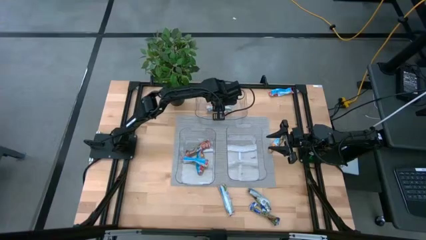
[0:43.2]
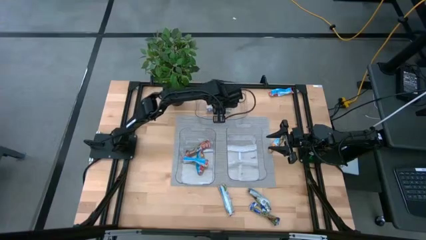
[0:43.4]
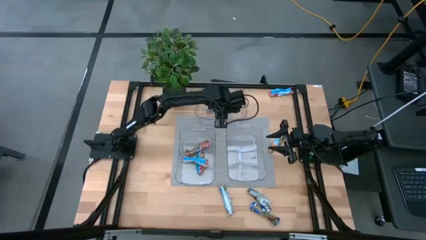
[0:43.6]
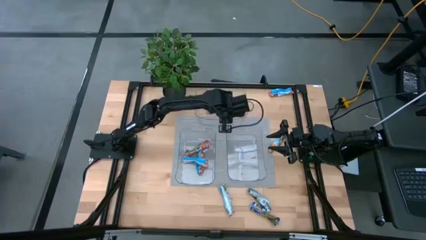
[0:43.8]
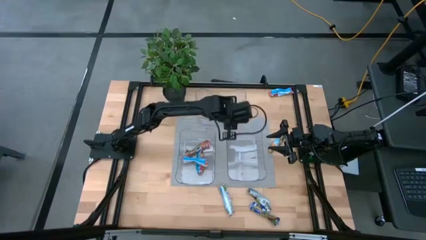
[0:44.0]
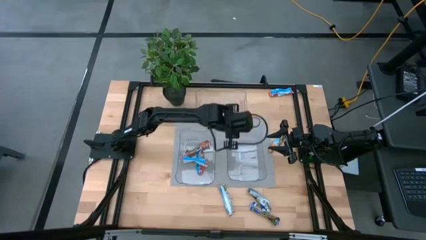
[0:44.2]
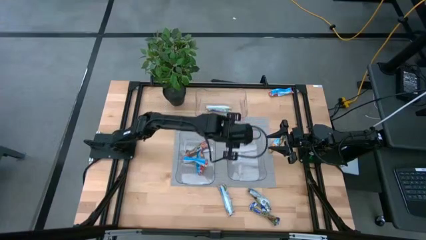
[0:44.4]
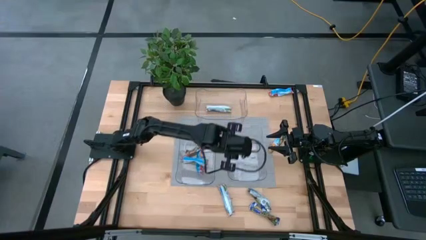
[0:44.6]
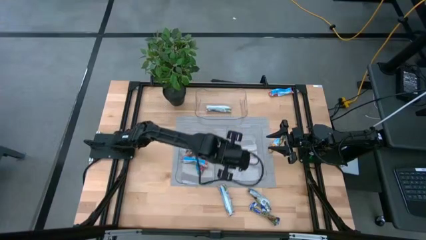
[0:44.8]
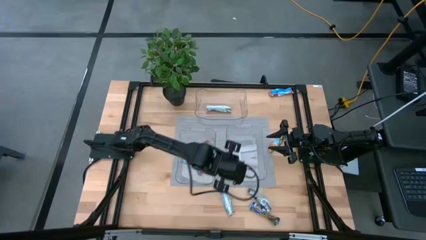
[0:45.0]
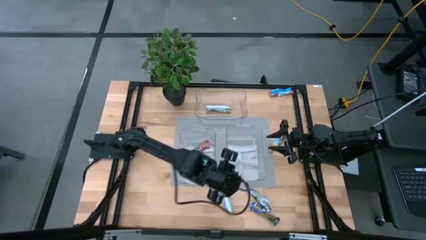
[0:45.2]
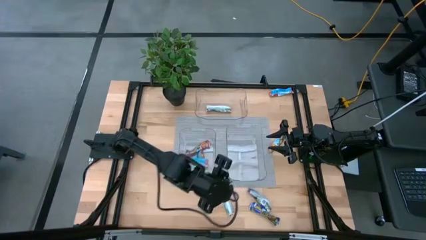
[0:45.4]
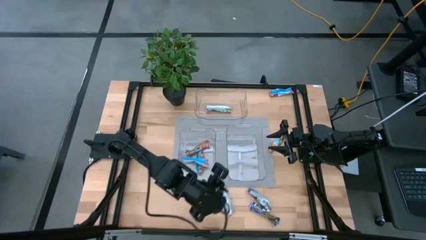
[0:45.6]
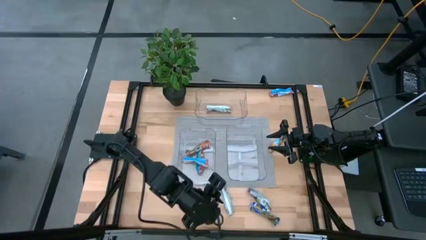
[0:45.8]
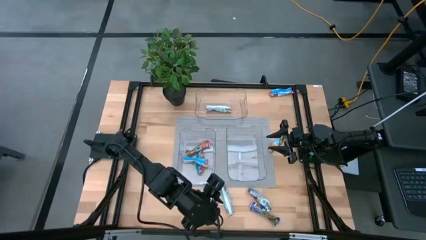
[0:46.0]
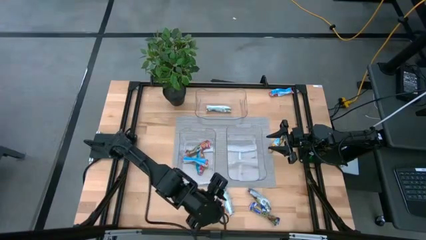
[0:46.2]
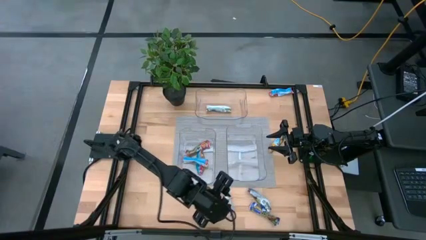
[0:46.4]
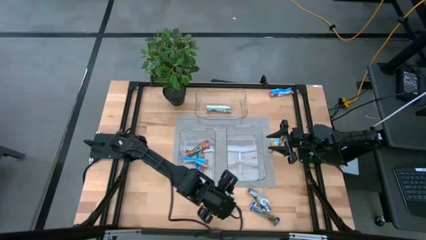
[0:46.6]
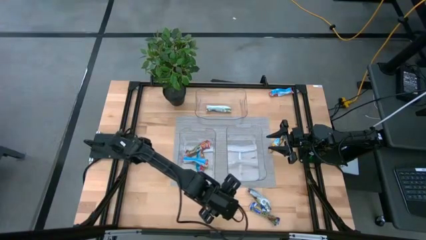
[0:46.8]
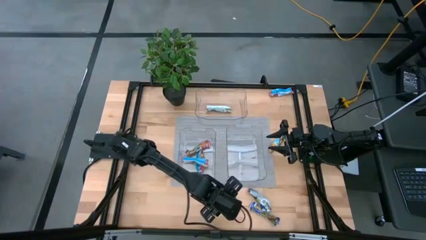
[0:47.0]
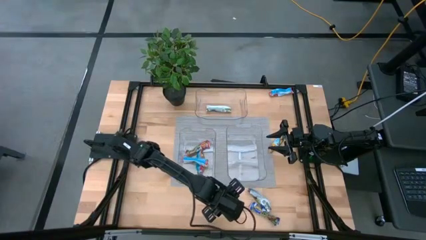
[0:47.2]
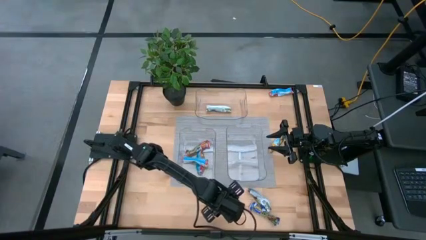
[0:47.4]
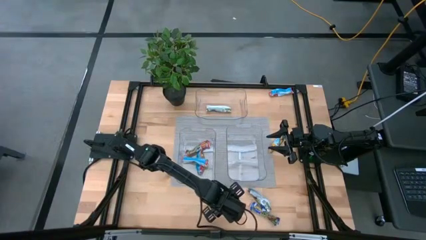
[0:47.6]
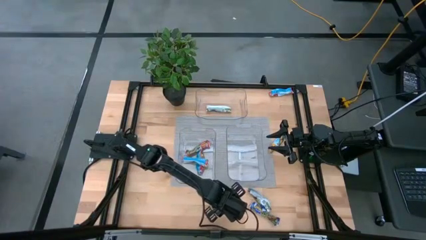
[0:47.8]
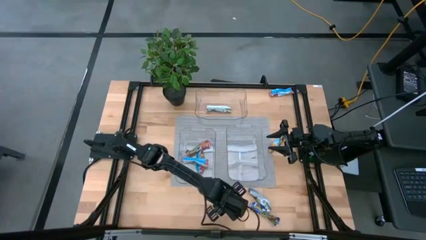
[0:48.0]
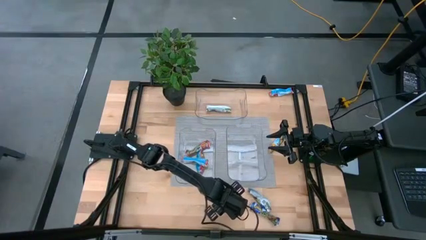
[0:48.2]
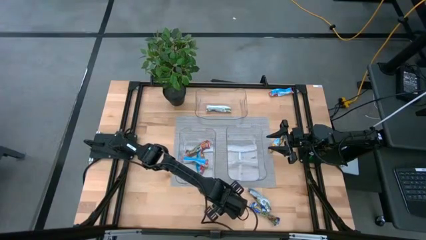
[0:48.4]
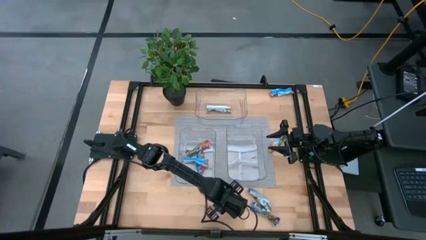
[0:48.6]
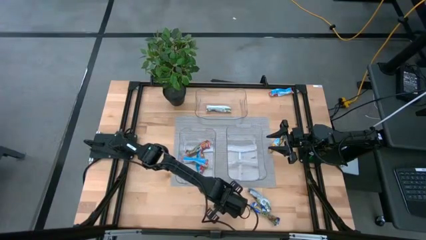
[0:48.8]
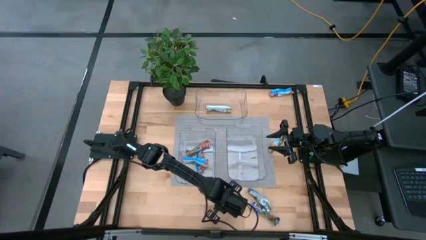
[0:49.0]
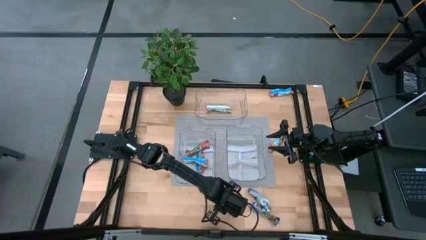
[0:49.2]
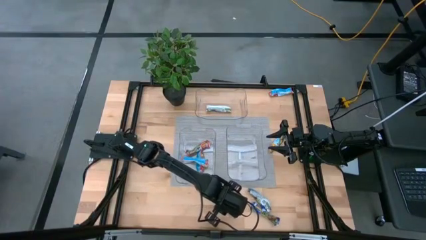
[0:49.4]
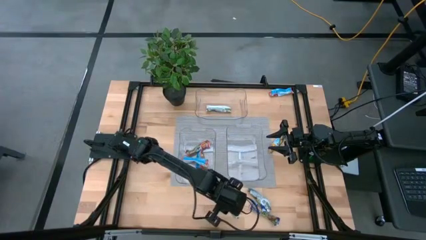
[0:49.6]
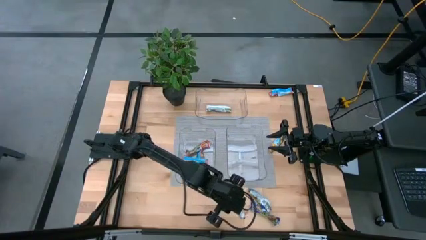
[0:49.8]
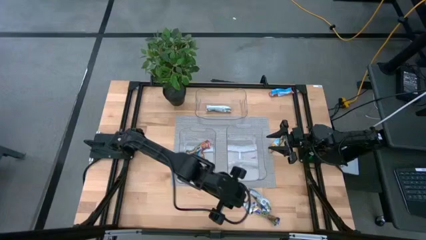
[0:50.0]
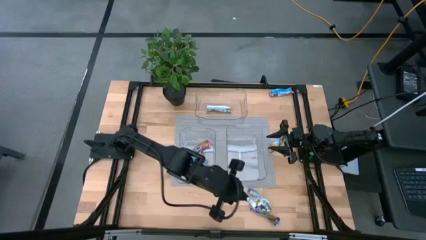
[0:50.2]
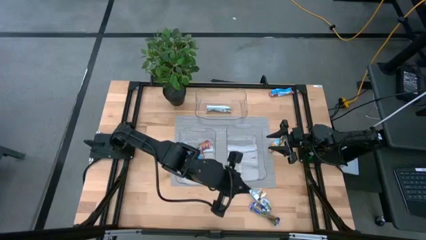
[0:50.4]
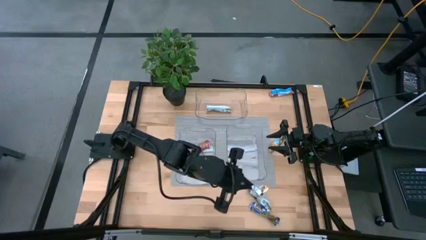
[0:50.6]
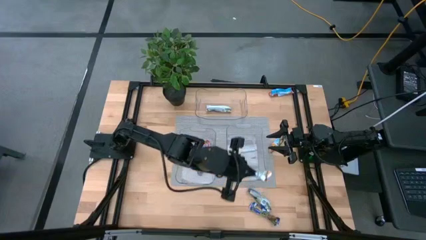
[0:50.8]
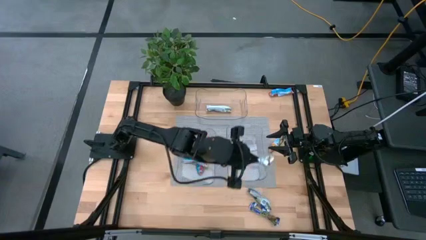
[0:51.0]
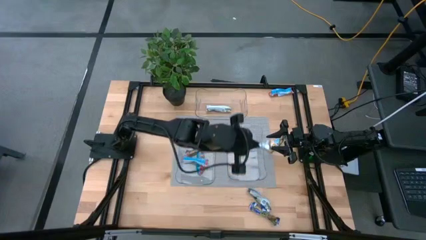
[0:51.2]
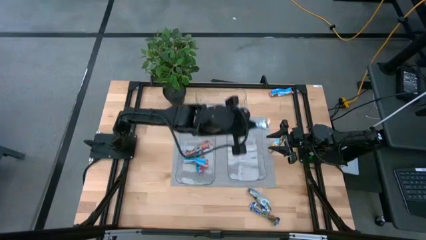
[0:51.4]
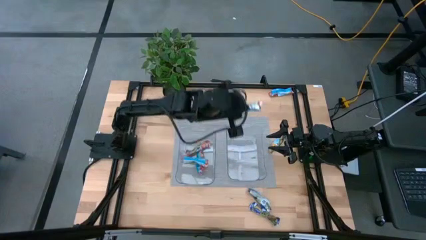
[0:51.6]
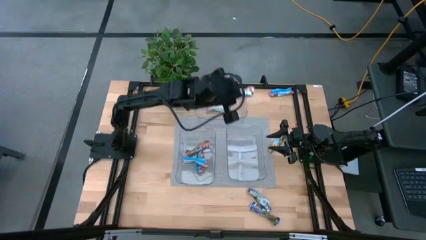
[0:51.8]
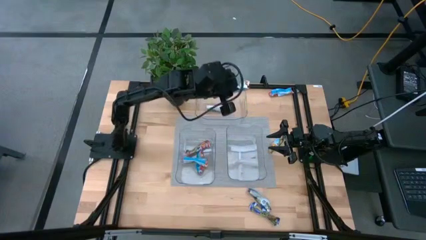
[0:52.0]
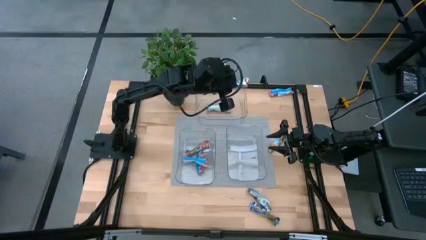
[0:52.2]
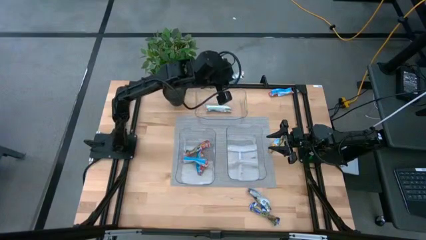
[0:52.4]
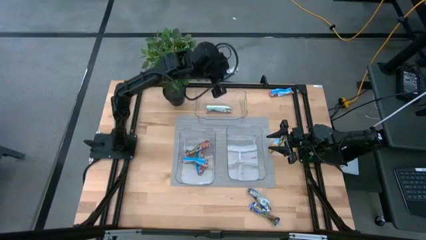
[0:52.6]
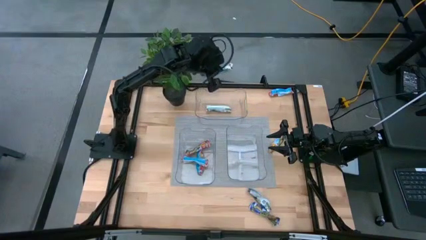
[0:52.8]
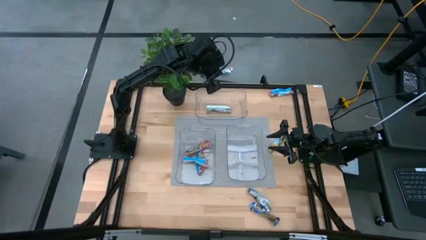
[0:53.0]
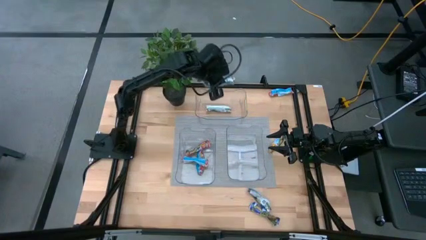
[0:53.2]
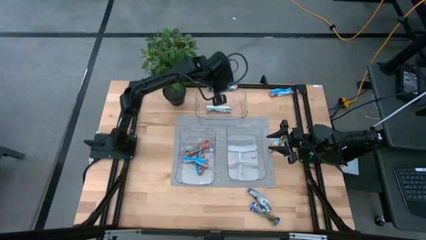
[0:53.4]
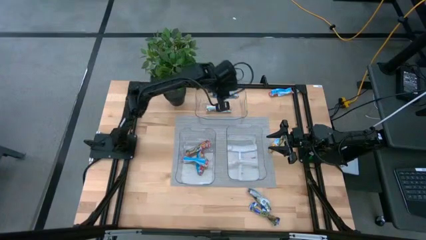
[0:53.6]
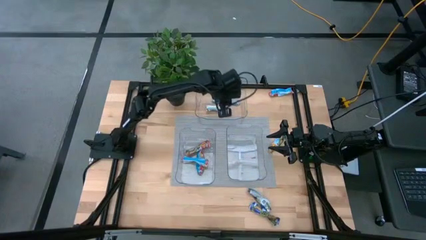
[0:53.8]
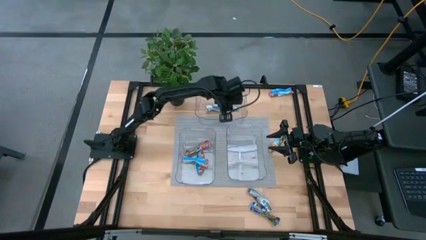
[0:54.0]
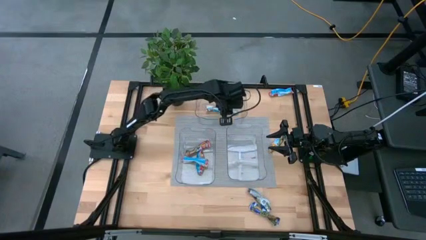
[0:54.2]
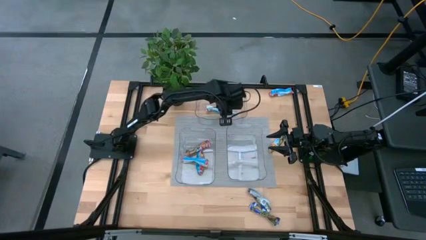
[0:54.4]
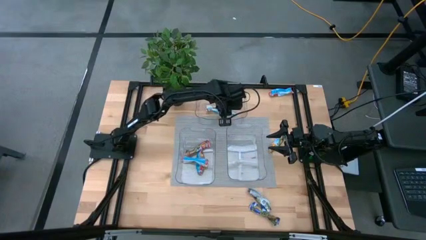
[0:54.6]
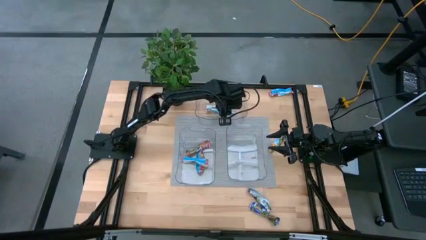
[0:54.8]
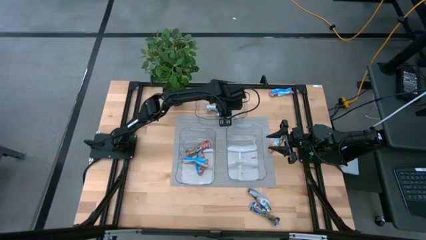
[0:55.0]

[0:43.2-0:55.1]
Task: Pick and place Granola Bars by type
Put the yellow granola bar into the top transparent bin

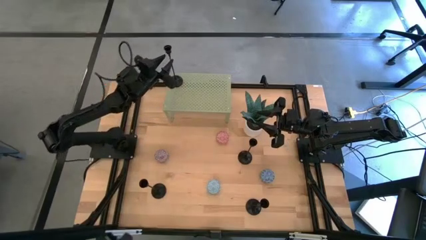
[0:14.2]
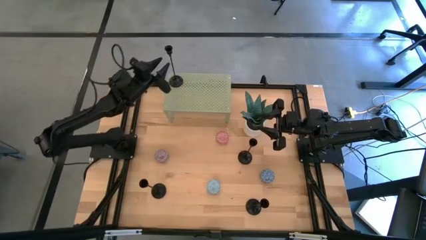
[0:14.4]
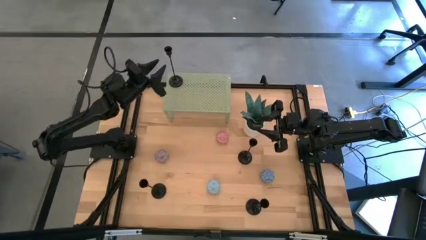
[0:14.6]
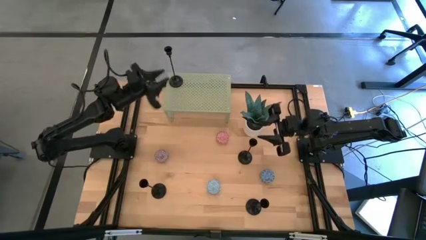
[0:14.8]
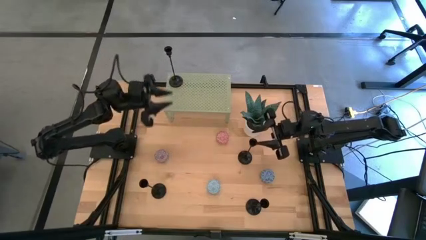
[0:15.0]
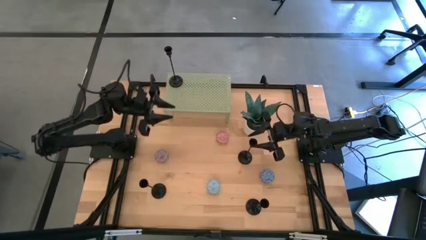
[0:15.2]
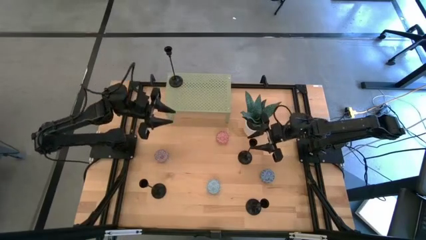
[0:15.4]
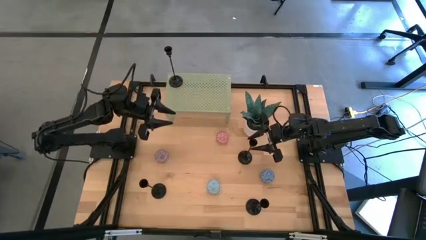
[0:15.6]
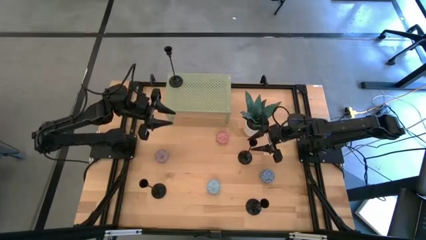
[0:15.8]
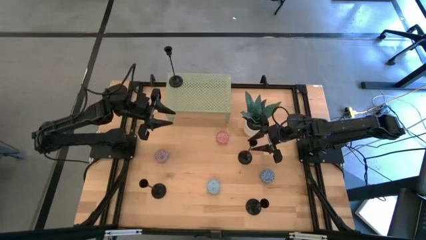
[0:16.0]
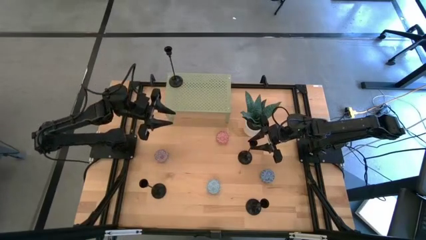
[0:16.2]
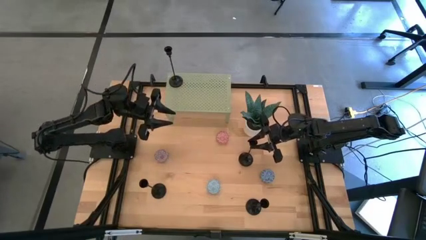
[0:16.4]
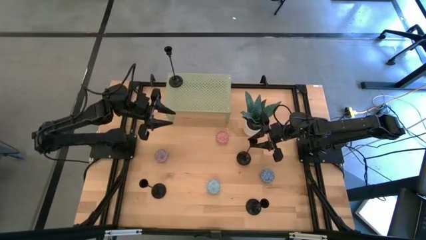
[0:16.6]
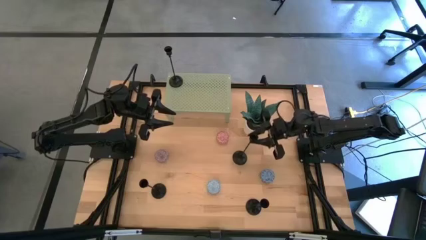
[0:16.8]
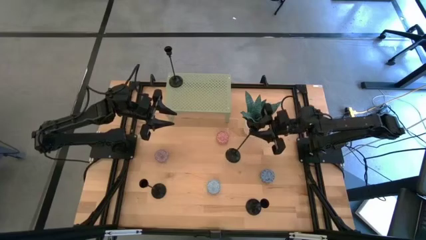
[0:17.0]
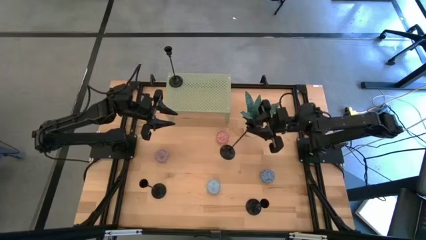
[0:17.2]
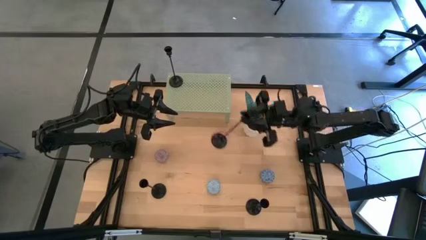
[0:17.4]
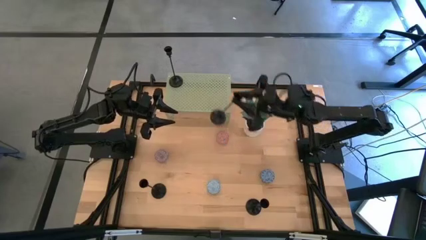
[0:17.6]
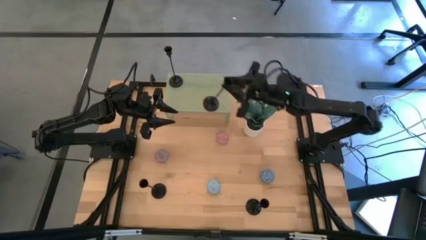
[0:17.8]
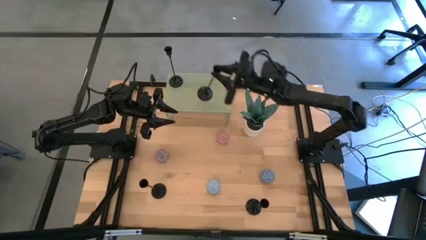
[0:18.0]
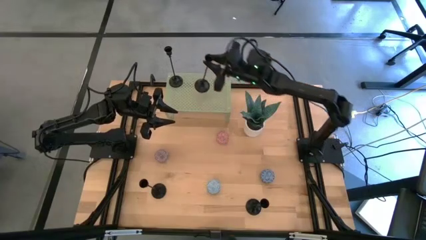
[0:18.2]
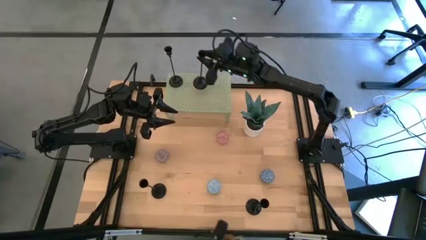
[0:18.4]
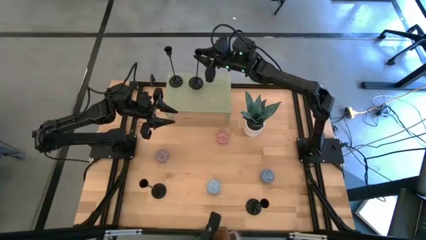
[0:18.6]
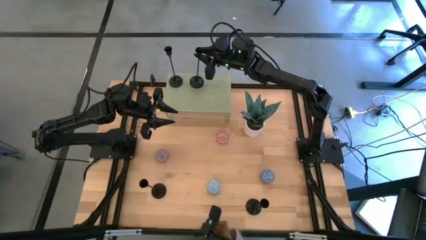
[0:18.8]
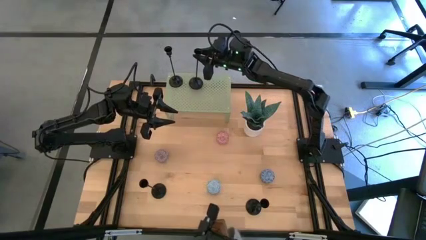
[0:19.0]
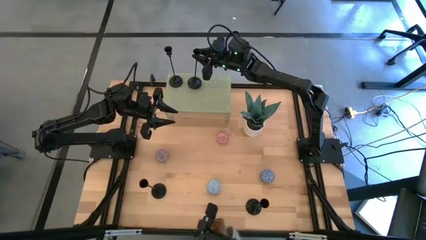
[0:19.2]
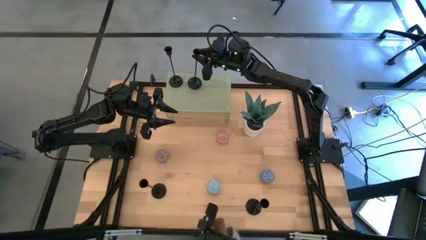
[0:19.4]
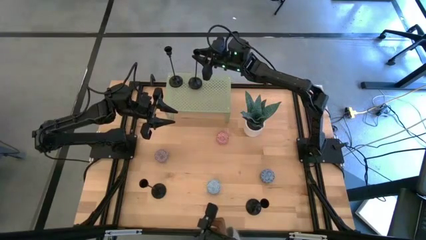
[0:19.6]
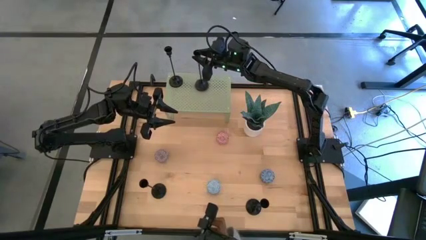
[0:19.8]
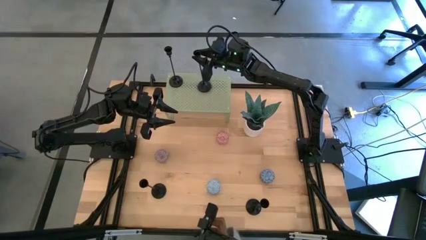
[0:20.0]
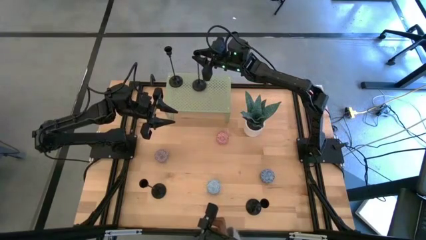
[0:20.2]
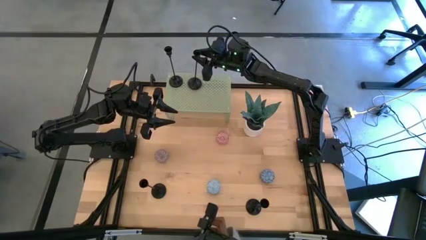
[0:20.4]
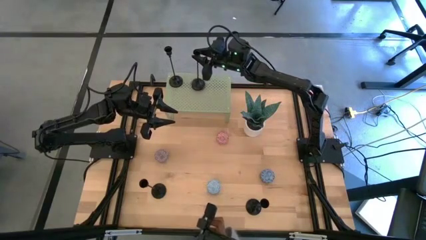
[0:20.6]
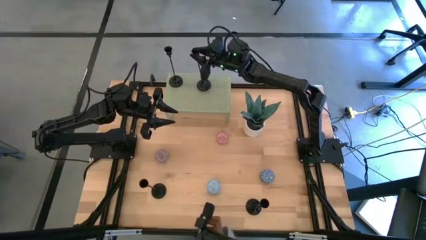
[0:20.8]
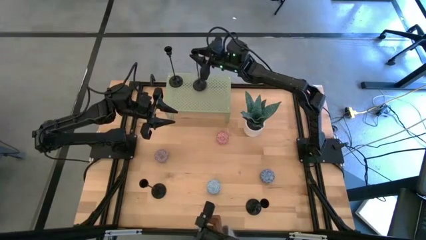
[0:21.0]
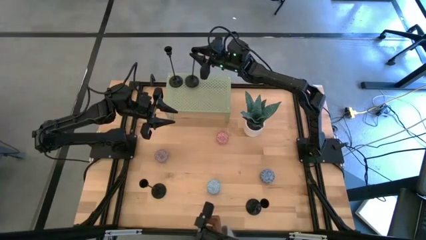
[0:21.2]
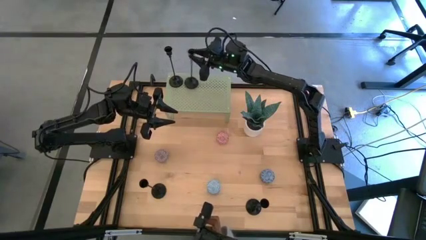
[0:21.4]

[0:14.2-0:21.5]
Task: Pick & Place candle stick holders
Align the black candle holder with the other black candle holder on the shelf
